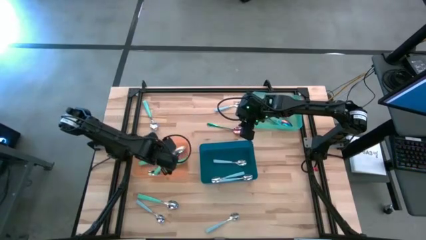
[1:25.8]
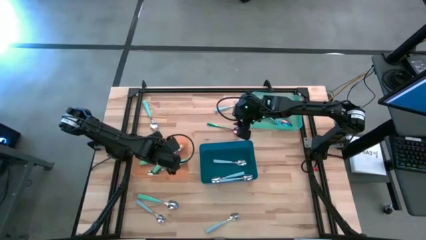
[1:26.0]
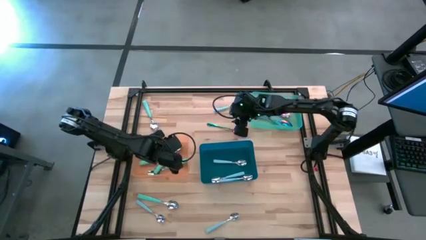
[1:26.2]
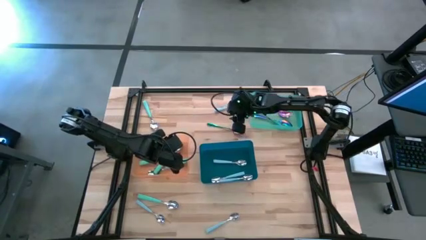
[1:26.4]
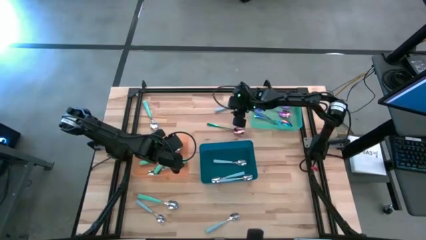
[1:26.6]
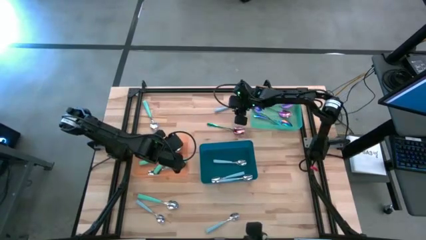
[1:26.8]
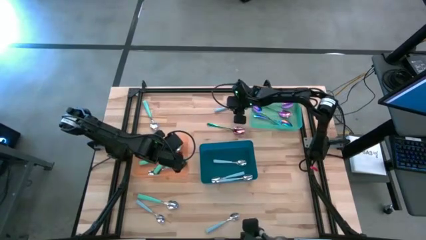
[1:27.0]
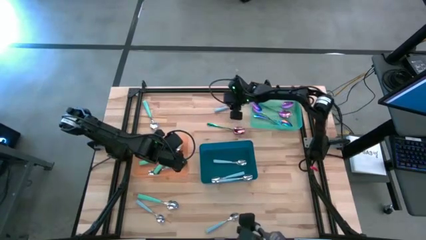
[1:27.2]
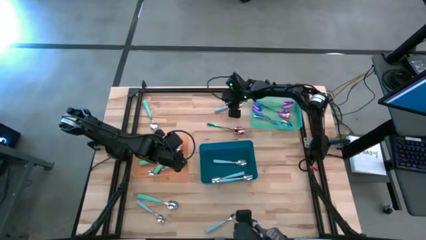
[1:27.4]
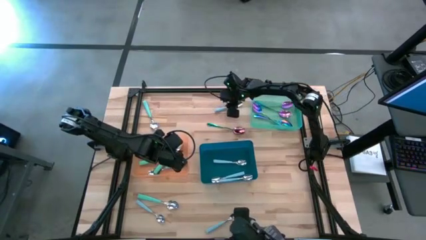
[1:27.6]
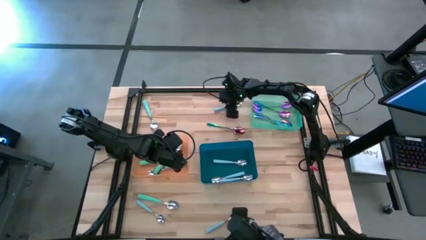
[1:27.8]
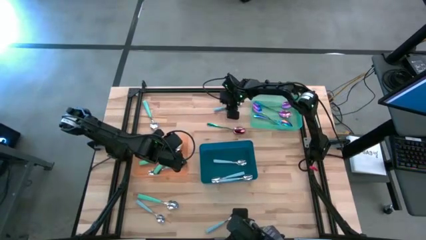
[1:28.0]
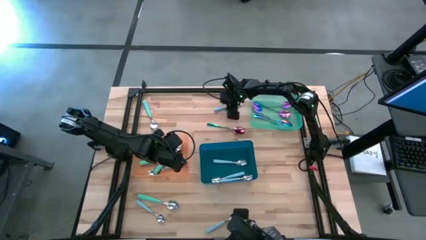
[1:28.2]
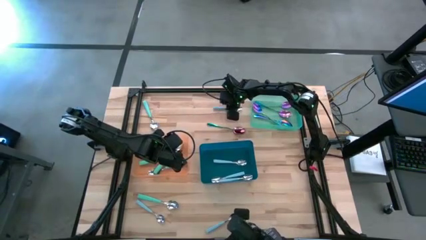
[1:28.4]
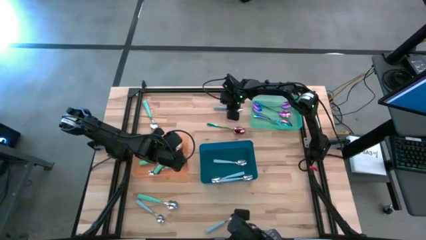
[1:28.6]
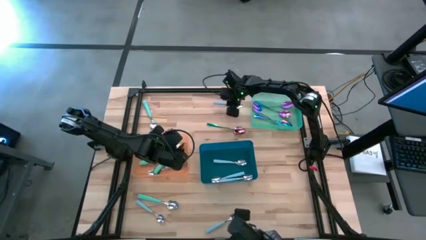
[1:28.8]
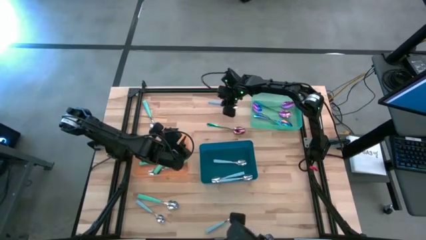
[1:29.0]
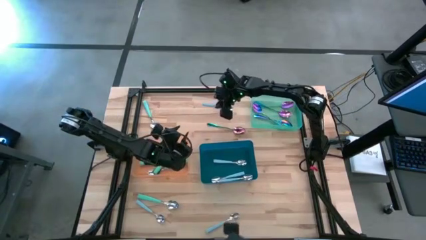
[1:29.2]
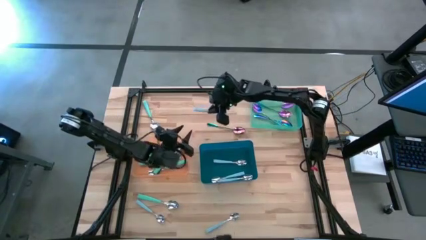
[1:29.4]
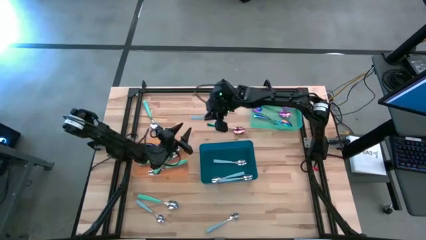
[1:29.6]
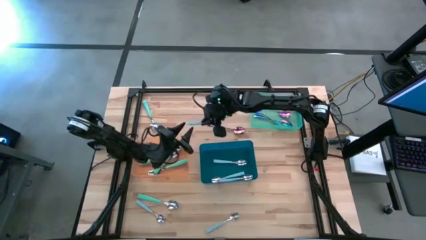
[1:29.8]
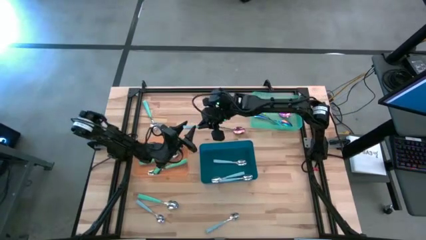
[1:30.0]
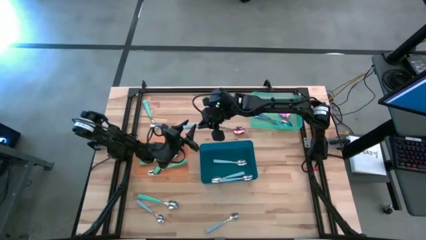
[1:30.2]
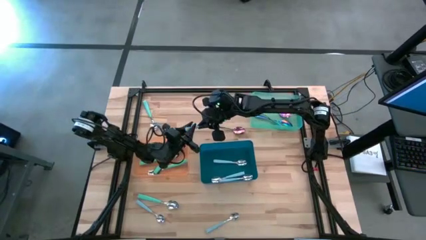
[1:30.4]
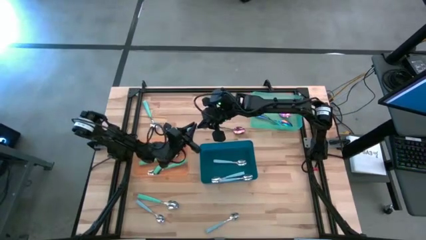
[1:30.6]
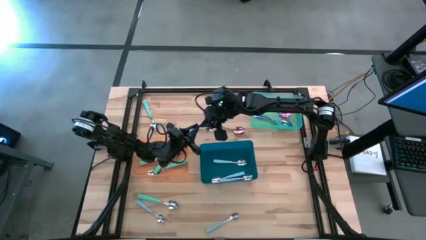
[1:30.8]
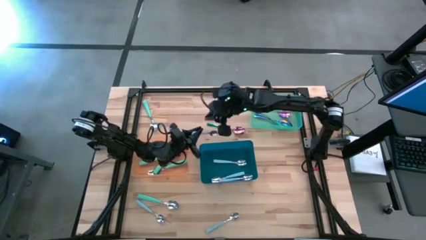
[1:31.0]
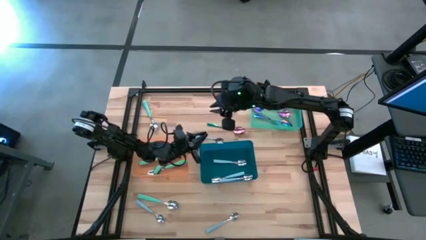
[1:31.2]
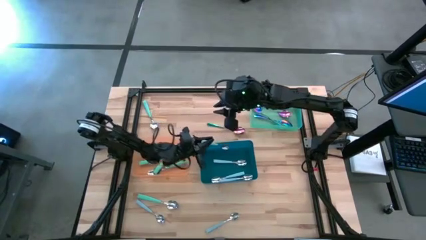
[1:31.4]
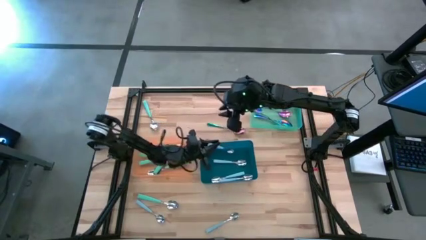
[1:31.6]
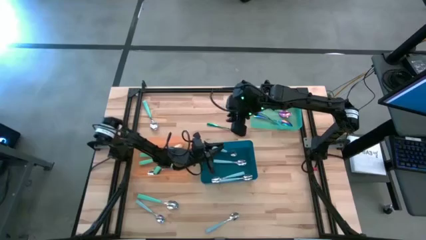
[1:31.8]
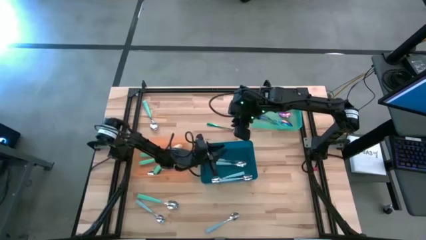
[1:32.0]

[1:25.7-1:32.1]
Task: Sort silverware by color (type)
Put the light blue spoon into the blue bin

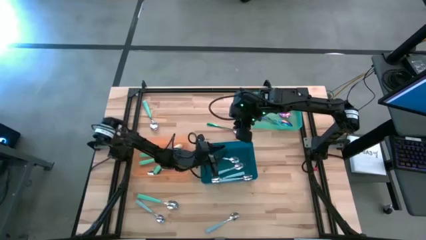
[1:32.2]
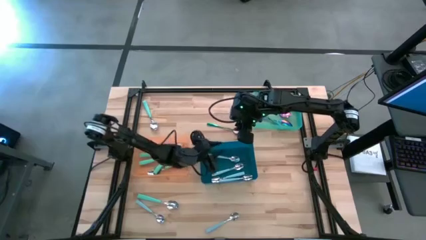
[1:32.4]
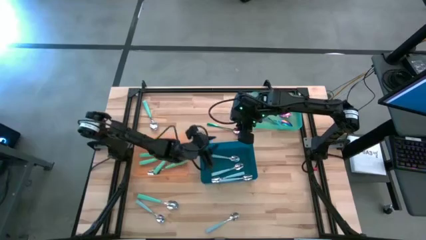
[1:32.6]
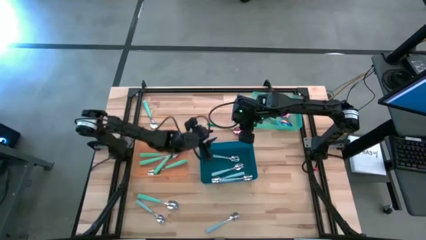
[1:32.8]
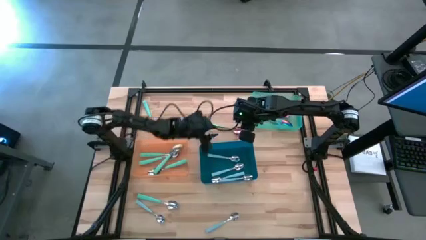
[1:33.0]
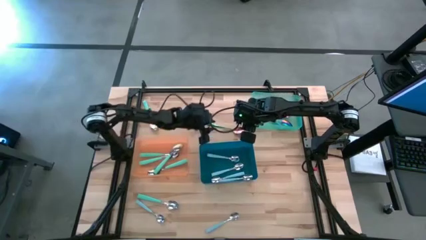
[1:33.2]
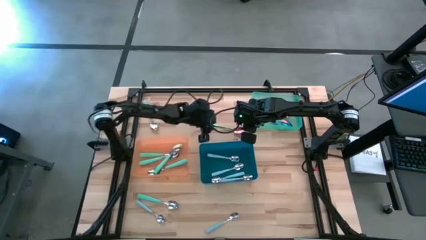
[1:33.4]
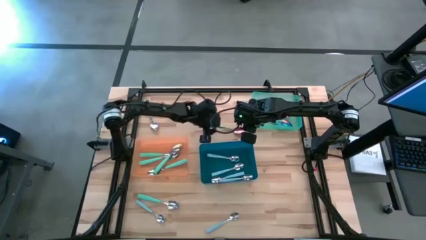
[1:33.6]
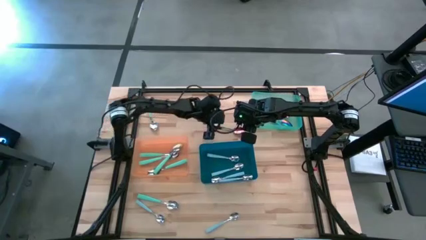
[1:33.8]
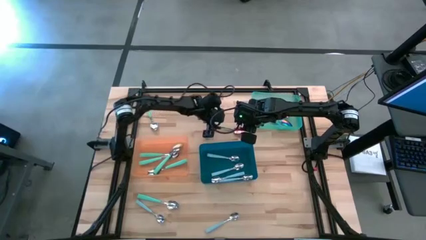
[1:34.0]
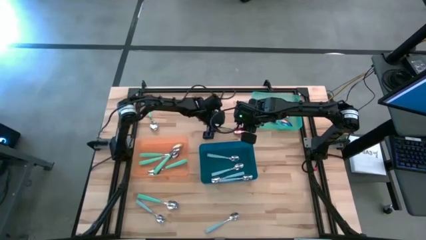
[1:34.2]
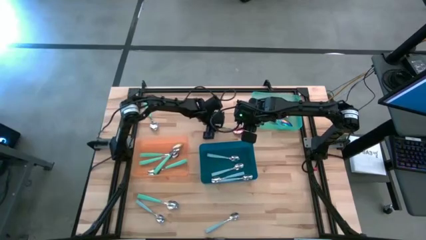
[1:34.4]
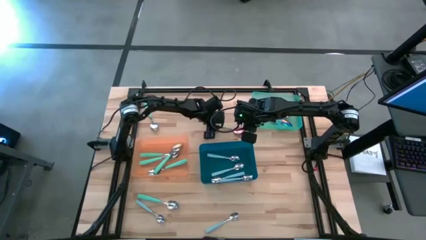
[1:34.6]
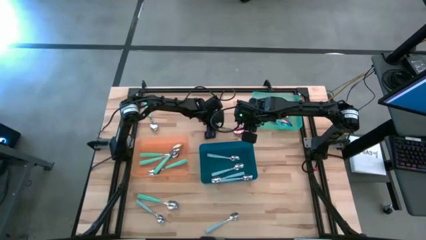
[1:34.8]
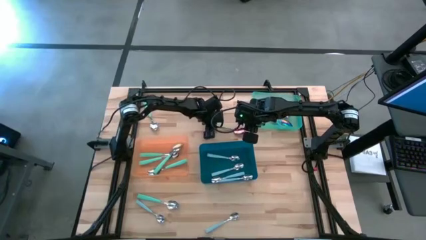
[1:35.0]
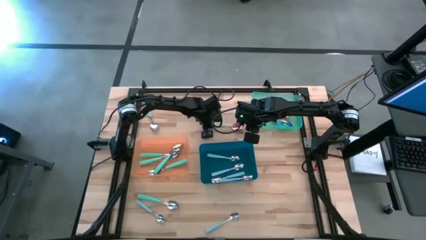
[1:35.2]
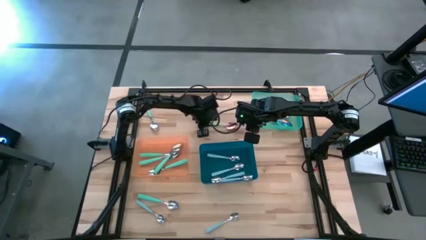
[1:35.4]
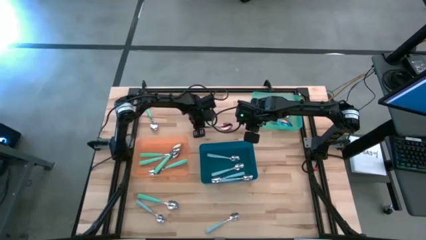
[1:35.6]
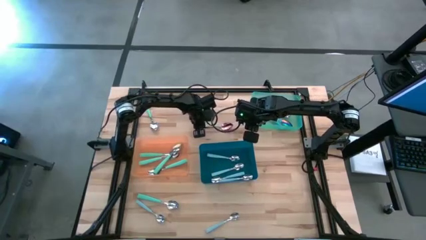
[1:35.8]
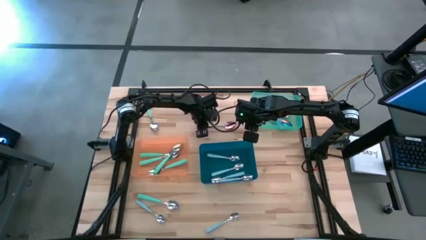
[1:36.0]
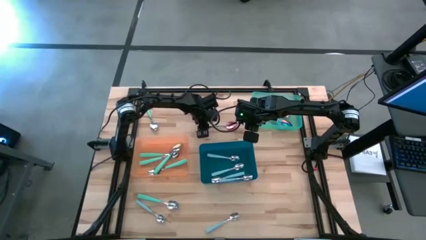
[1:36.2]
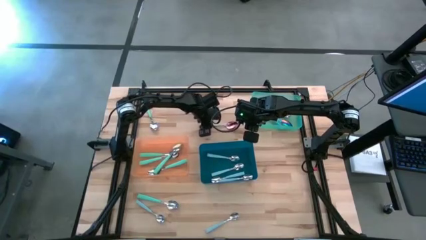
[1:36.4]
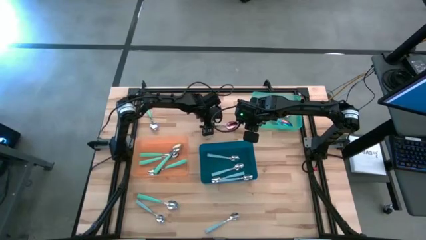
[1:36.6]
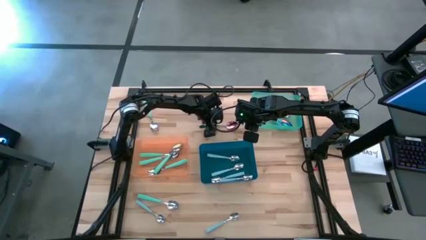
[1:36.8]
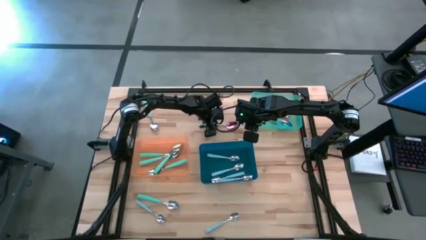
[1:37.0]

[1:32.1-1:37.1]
Put the blue spoon into the green bin

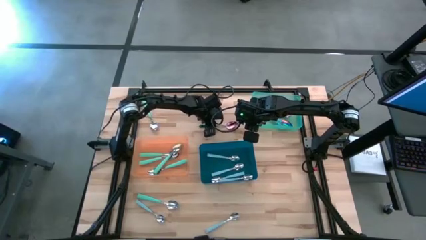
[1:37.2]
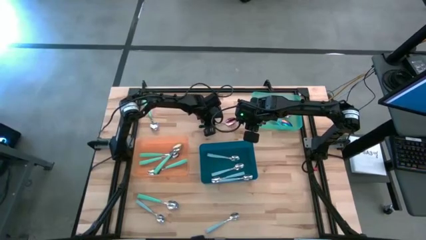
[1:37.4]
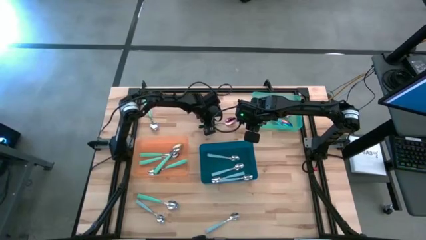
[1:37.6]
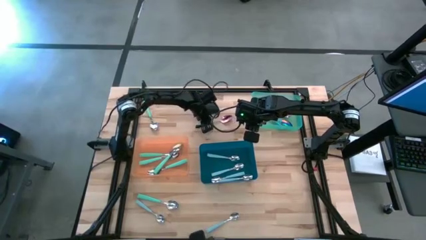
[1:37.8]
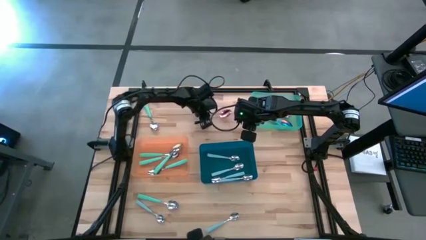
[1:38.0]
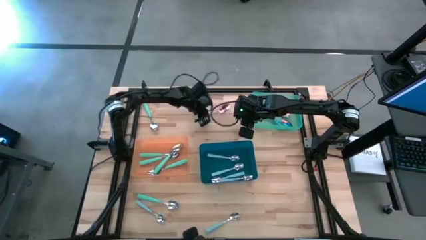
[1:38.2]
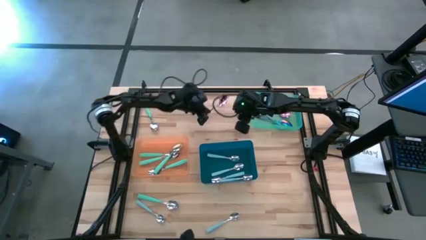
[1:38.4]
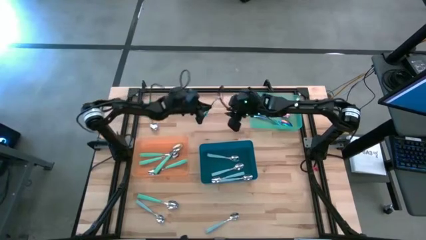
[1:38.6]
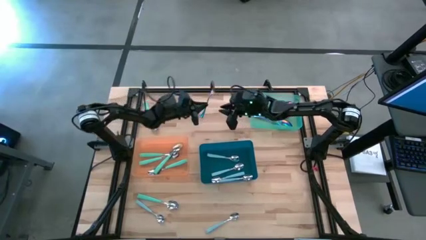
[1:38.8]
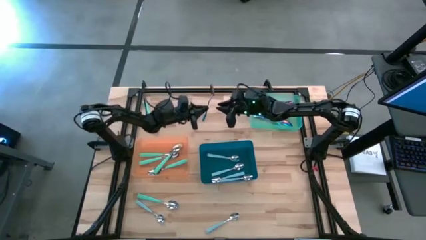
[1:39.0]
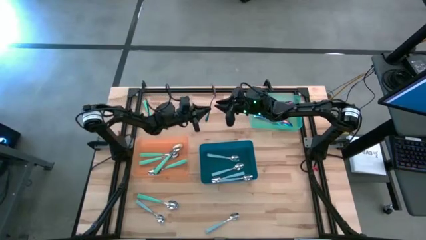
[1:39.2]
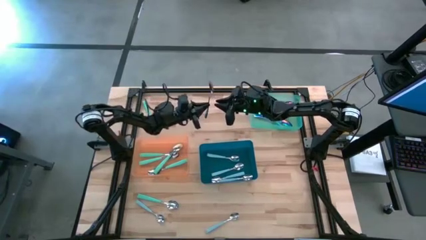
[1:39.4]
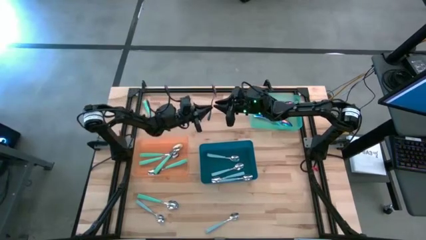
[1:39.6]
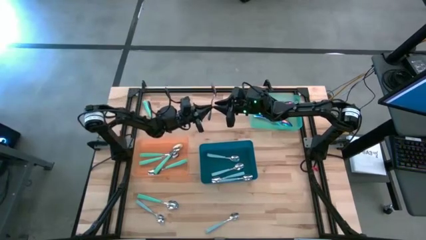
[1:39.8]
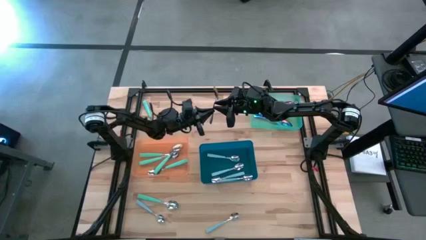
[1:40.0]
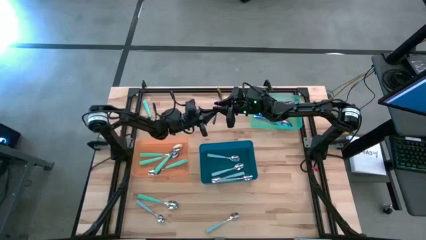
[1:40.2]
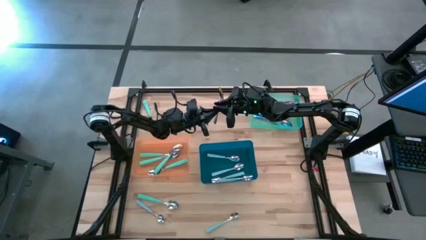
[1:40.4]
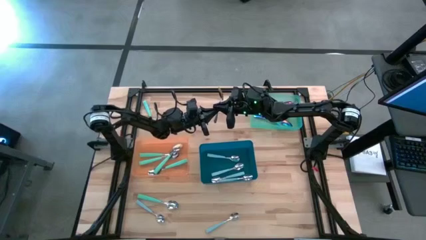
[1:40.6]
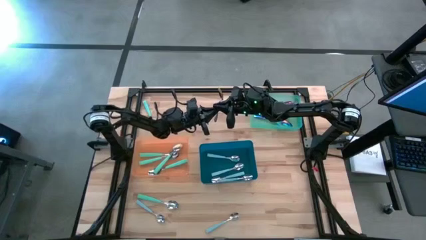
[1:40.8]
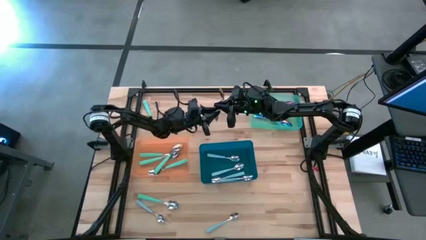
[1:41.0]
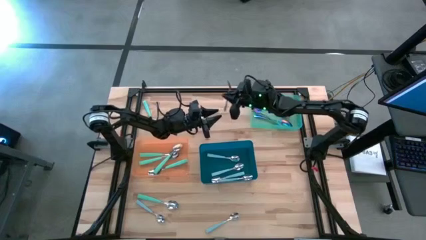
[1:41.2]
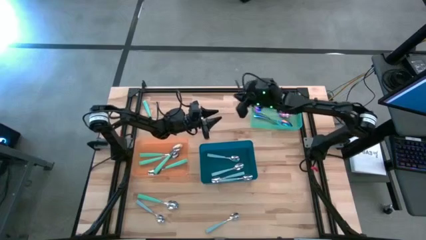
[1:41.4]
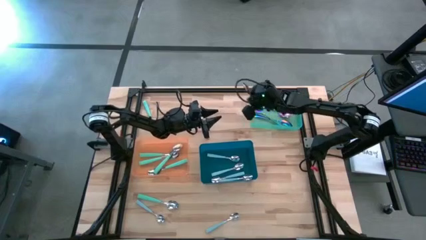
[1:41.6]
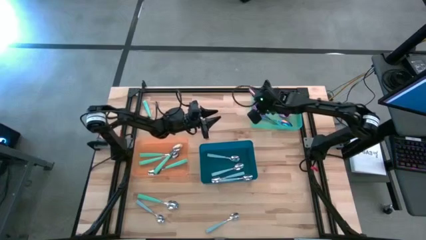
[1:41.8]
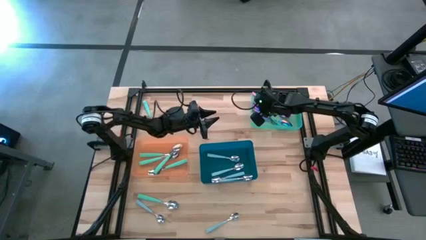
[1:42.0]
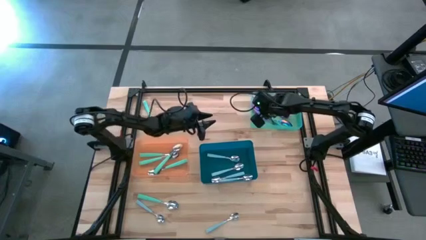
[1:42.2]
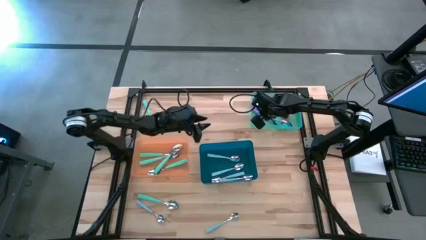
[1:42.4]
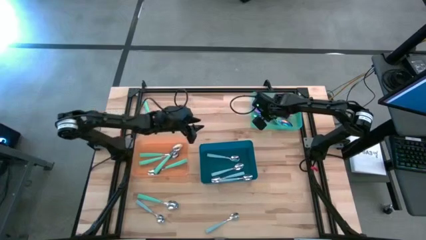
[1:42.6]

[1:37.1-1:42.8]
Put the blue spoon into the green bin
